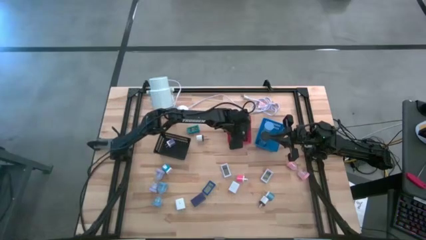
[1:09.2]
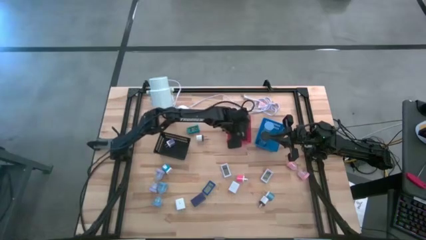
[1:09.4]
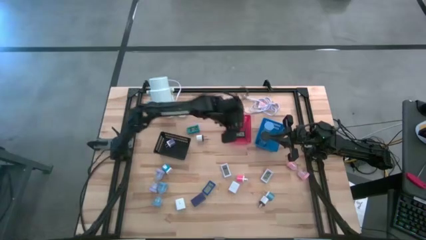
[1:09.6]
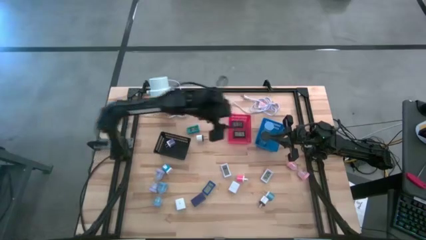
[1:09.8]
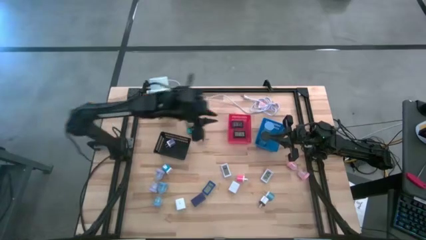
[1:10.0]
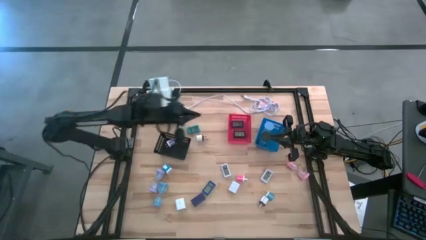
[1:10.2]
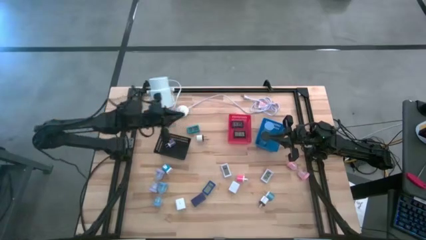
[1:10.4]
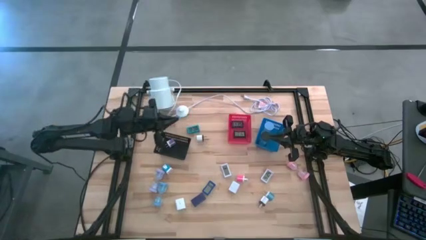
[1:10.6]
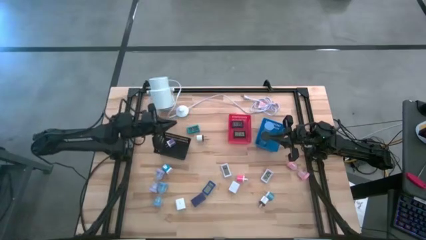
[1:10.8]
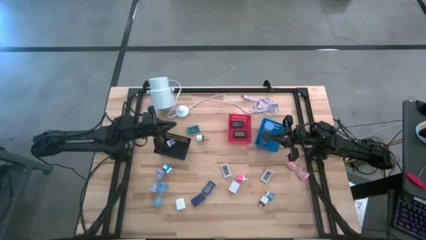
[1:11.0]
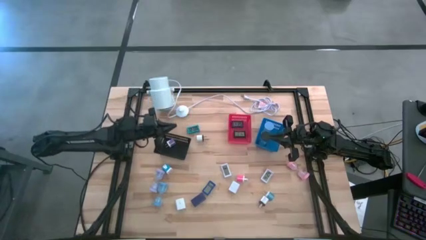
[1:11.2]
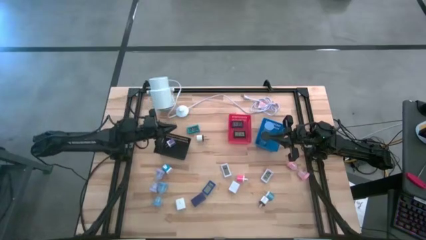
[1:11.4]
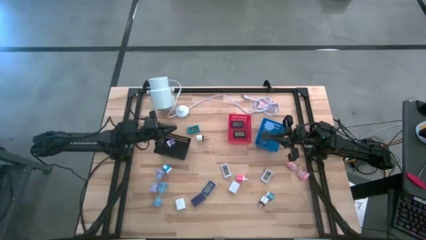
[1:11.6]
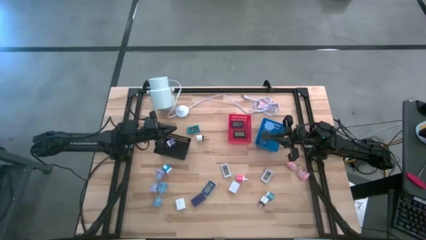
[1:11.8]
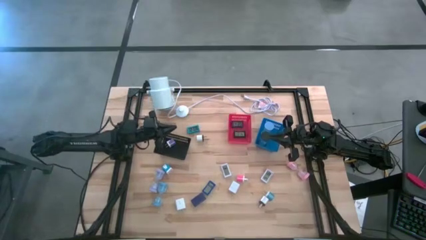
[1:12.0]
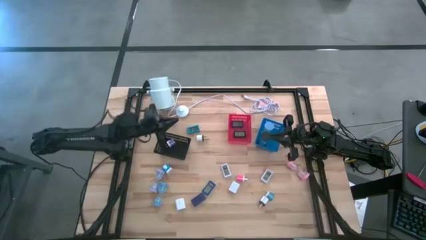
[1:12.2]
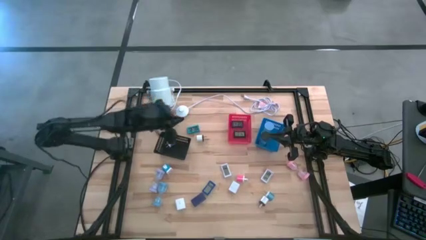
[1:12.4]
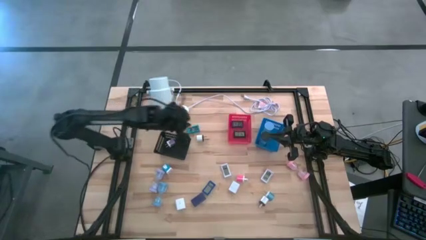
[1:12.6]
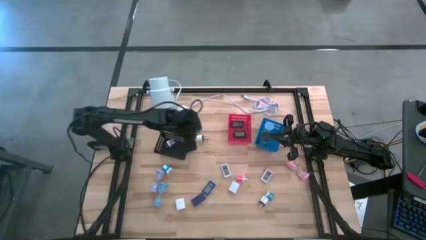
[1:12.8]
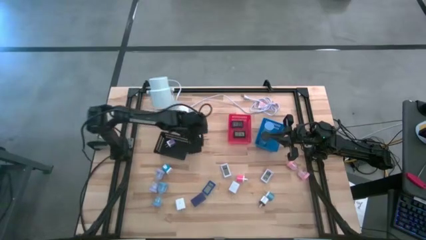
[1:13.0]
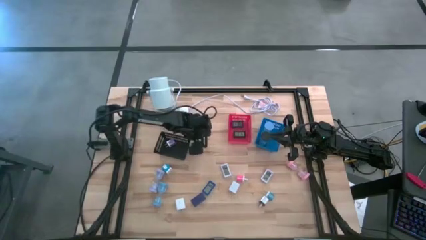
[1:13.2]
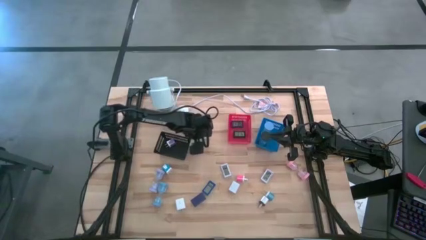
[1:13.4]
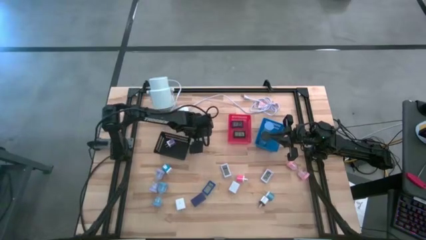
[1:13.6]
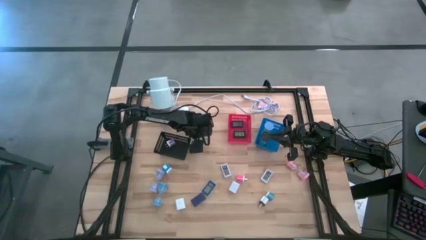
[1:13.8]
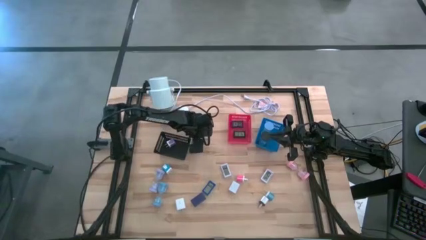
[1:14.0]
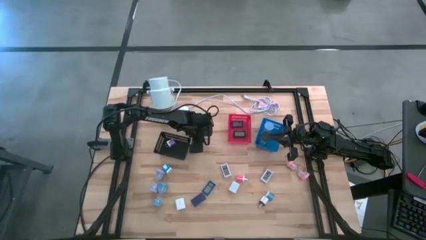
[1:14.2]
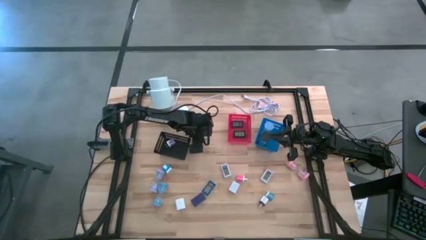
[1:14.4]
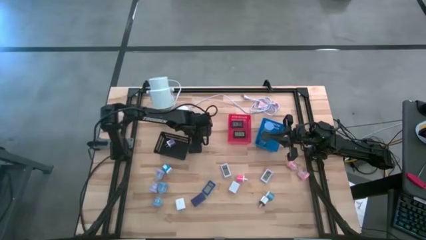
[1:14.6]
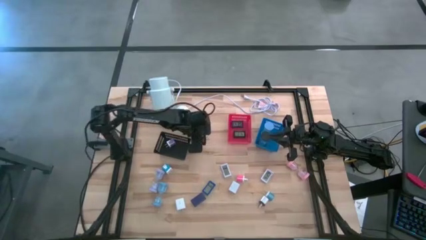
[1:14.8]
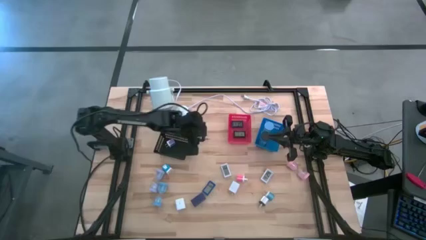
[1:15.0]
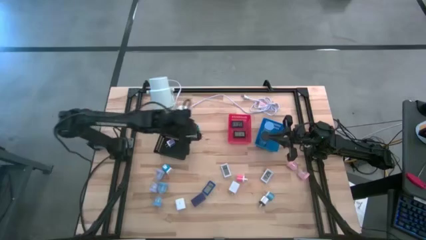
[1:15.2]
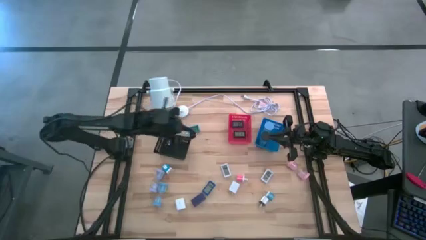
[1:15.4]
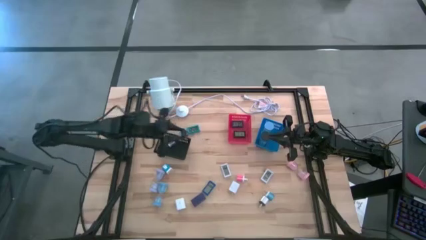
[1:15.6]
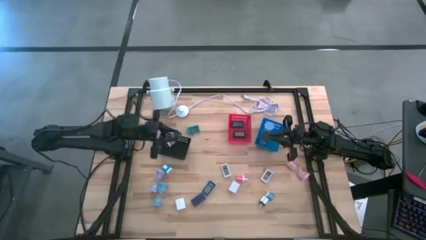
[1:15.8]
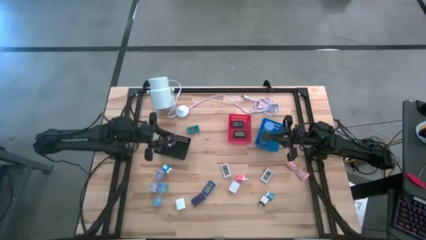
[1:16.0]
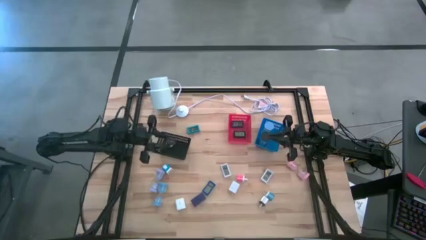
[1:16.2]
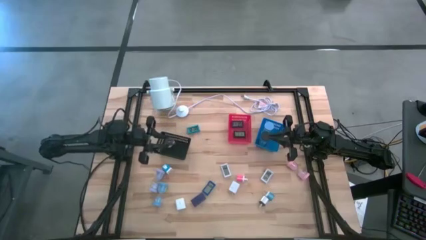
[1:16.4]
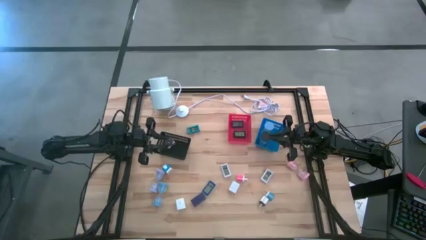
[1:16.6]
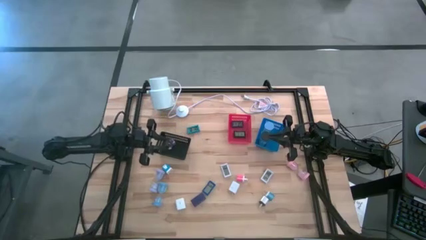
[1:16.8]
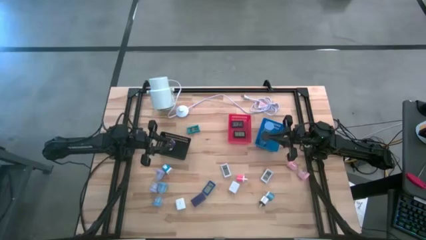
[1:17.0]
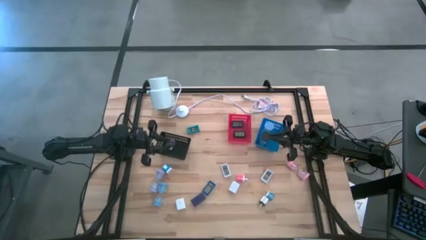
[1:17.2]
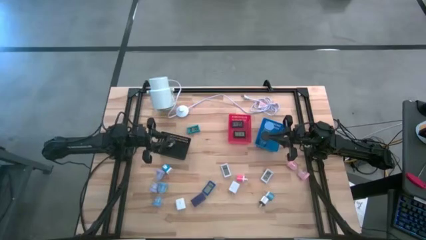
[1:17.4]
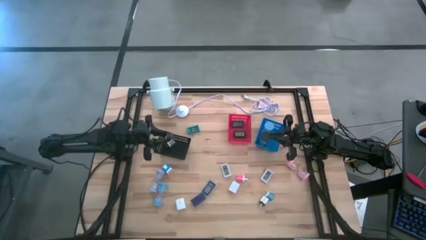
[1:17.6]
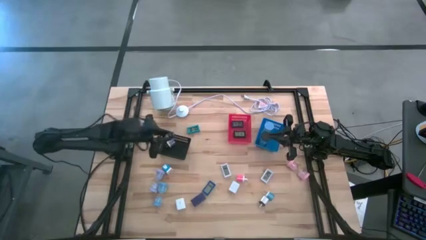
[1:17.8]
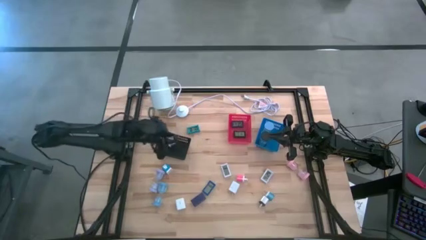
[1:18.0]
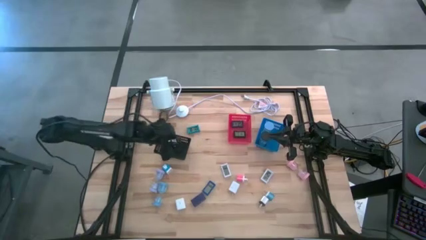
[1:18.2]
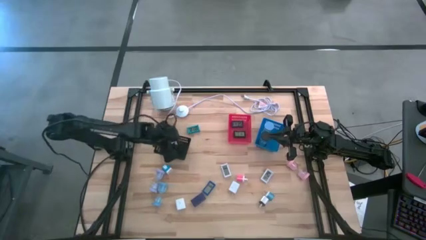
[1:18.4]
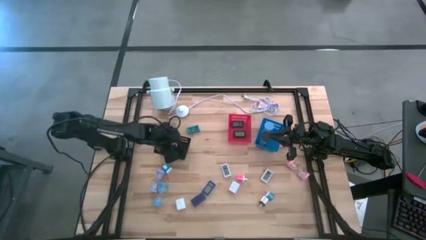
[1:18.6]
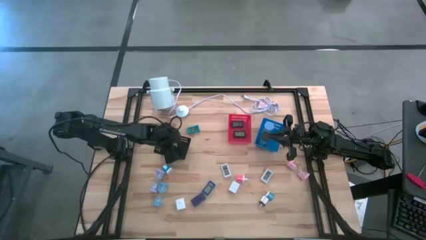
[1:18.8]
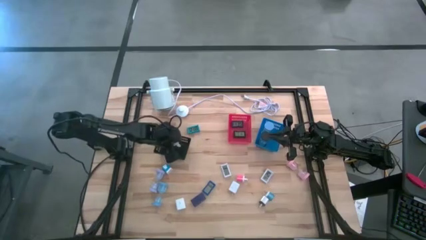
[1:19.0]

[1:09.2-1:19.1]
Task: Pick & Place Office items
Put the top black-white charger adaptor into the black bin

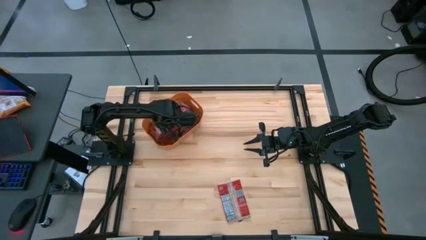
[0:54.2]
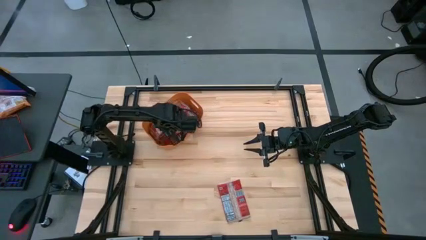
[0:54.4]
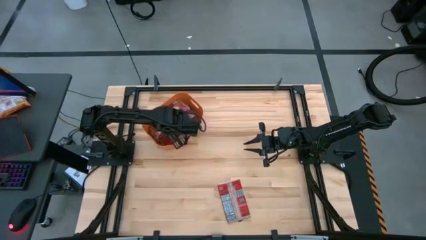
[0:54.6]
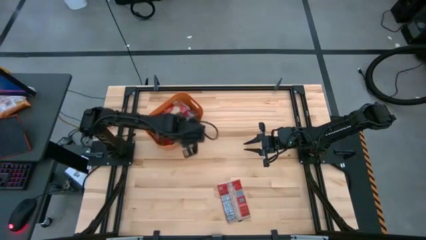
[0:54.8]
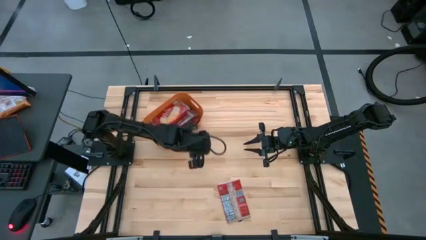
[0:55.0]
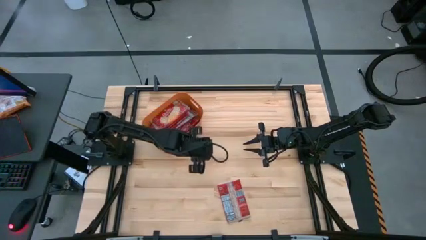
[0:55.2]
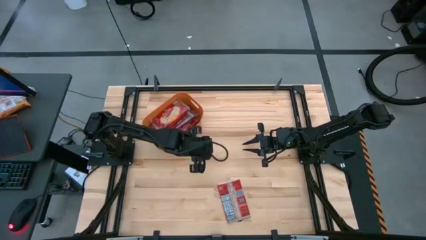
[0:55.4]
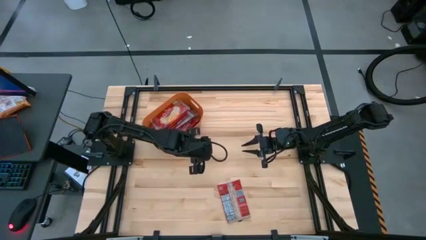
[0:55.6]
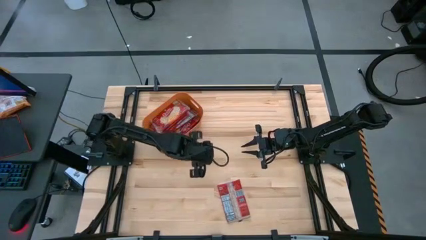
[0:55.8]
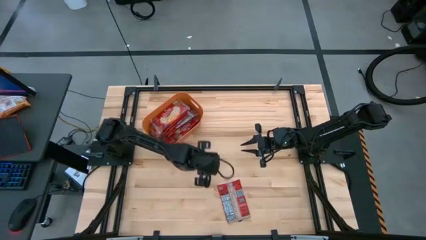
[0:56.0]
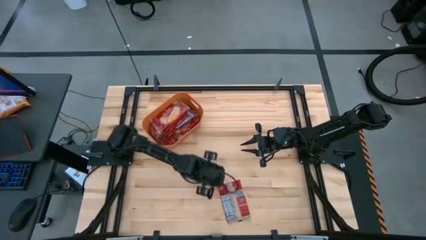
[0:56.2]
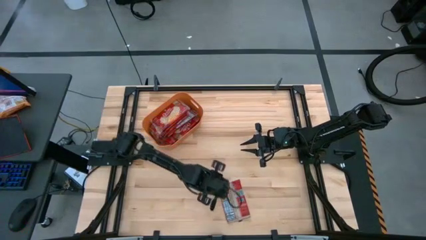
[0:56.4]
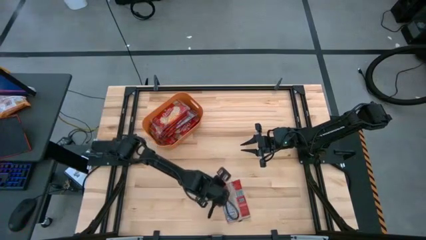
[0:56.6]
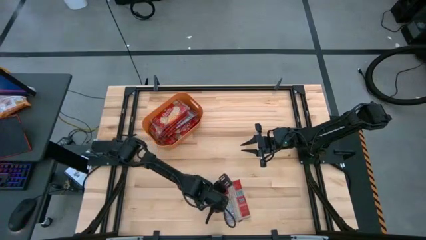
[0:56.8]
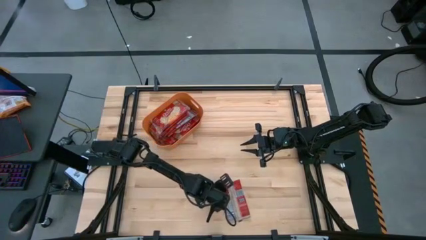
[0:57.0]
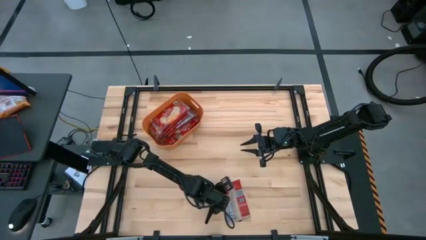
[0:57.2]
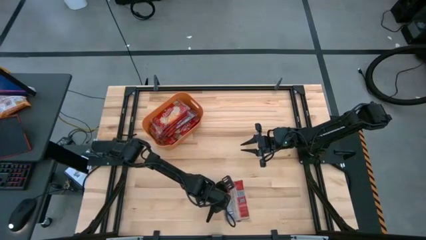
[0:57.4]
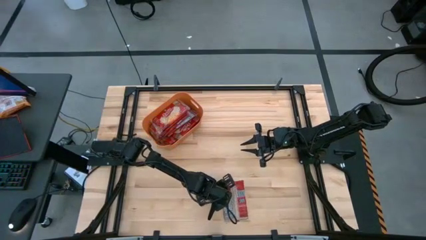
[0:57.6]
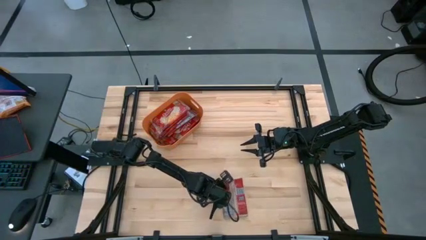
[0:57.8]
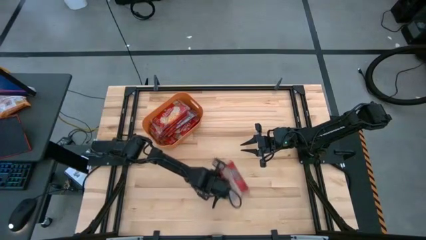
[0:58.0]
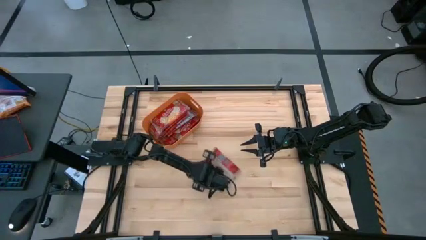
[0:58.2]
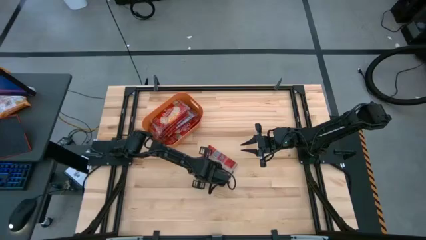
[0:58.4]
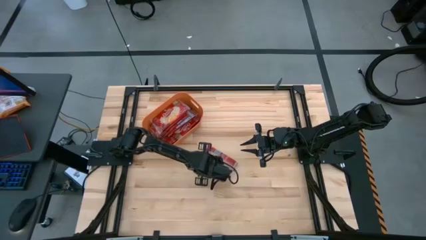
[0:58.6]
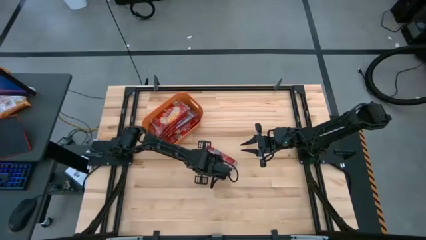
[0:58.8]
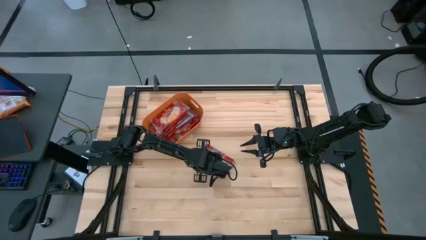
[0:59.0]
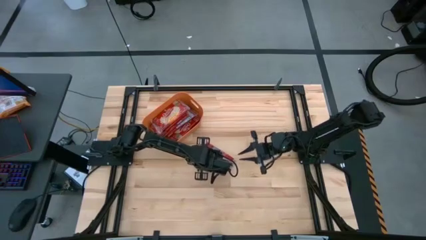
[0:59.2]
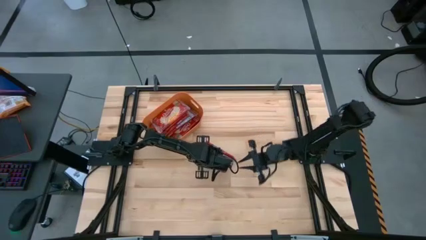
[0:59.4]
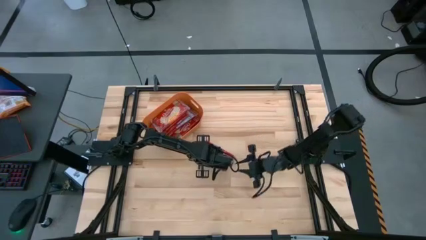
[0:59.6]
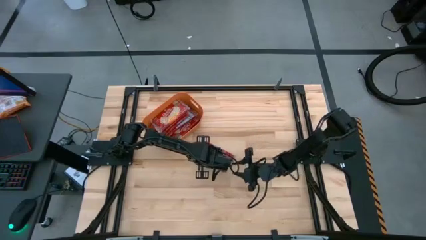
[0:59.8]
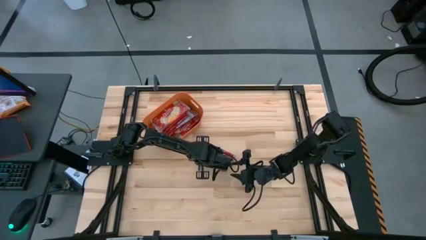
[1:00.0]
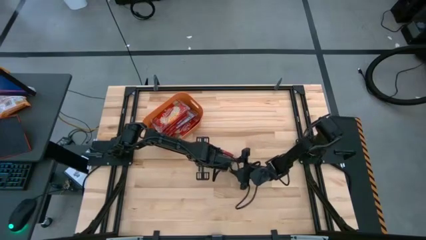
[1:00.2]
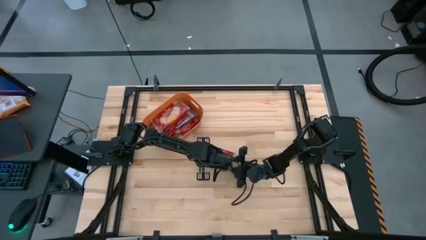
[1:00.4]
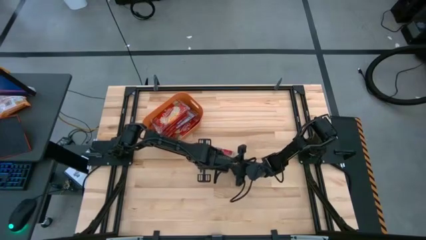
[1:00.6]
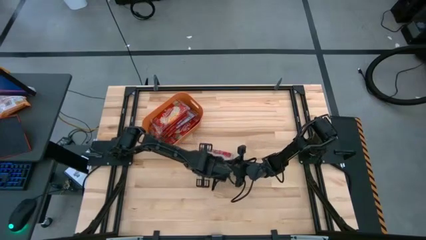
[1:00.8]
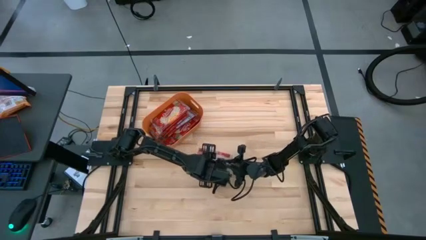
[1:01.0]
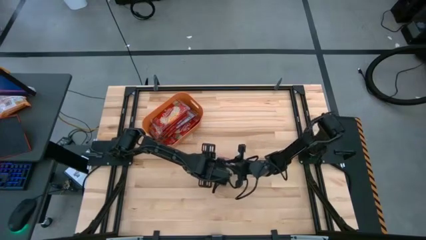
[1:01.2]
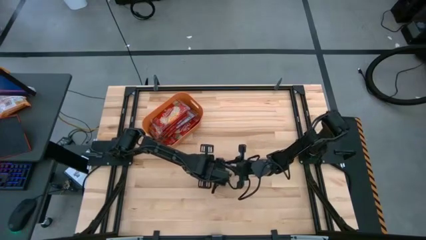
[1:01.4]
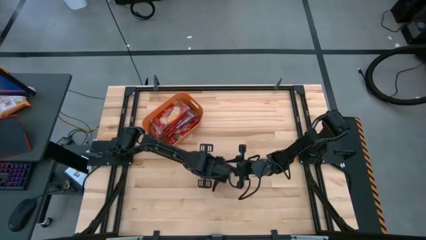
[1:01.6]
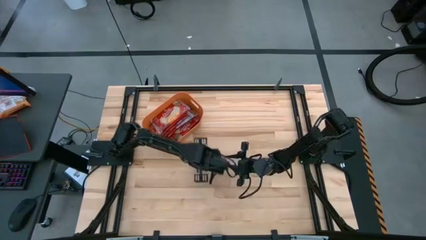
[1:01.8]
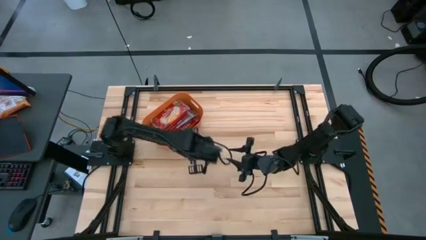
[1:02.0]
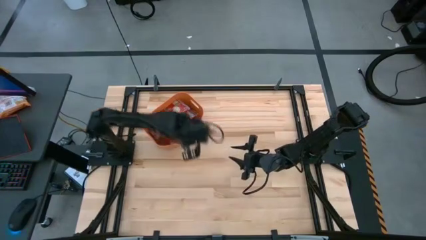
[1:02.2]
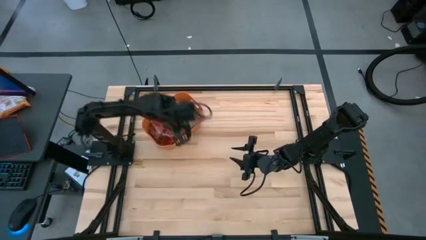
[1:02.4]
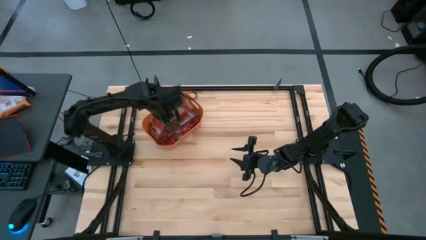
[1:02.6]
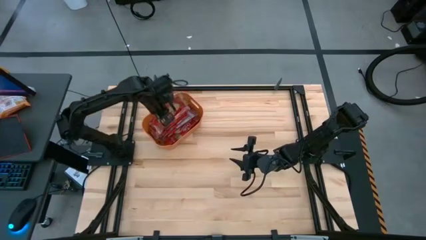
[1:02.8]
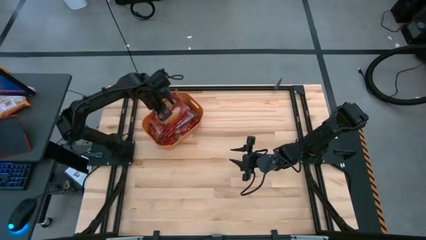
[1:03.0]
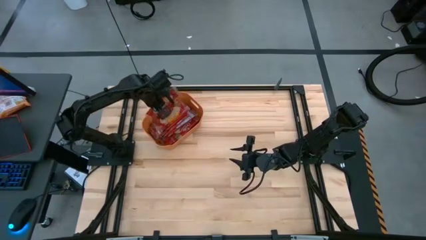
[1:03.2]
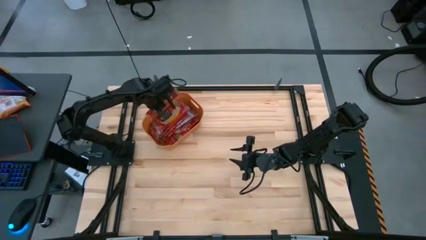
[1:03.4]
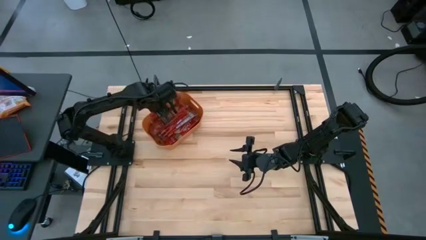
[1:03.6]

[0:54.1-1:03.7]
Task: Sort popcorn bags into baskets
Put the red popcorn bag into the orange bin
